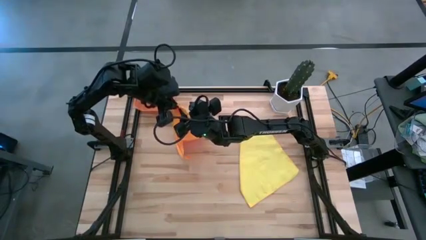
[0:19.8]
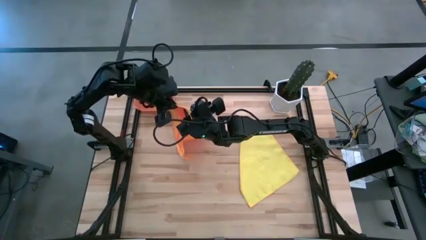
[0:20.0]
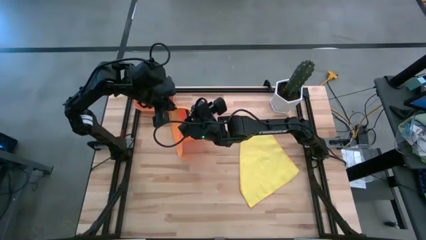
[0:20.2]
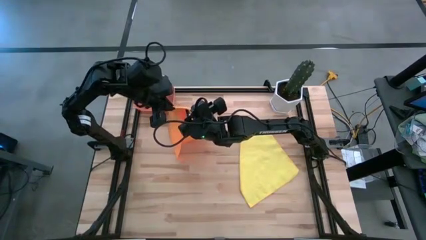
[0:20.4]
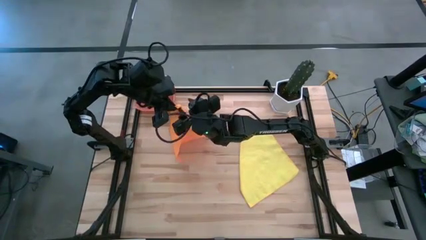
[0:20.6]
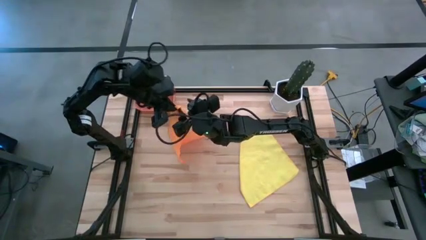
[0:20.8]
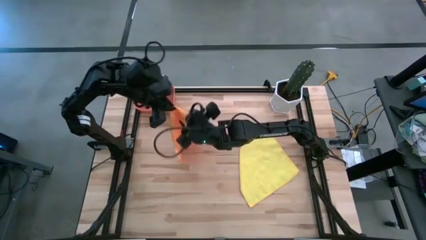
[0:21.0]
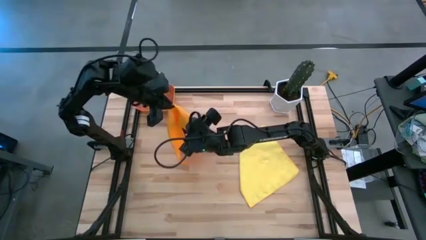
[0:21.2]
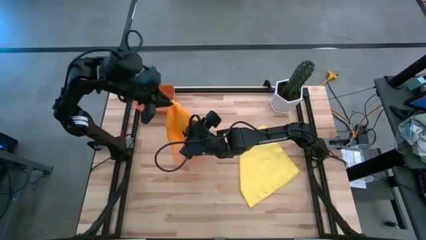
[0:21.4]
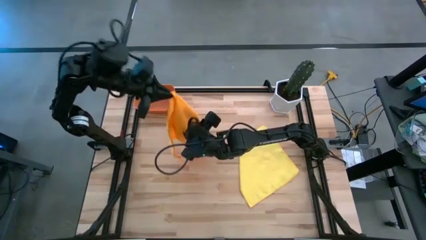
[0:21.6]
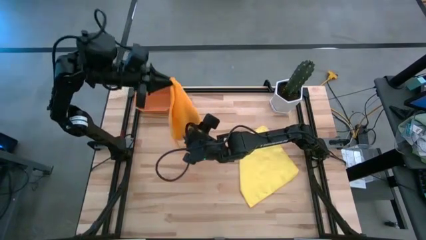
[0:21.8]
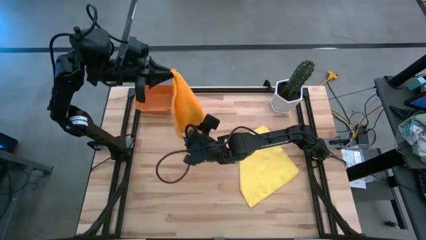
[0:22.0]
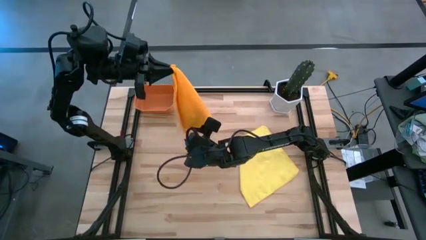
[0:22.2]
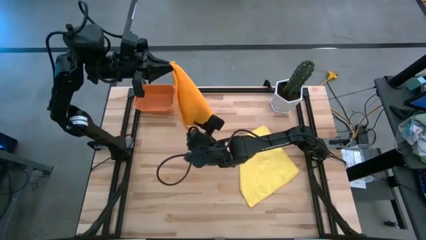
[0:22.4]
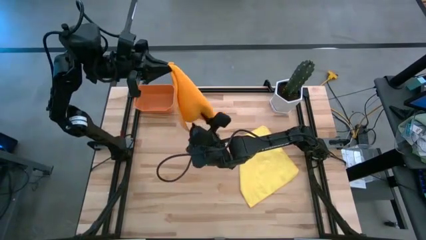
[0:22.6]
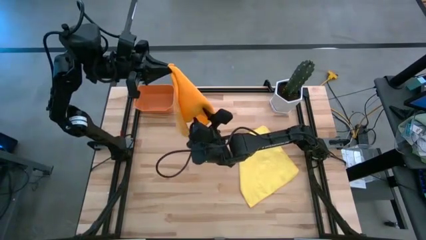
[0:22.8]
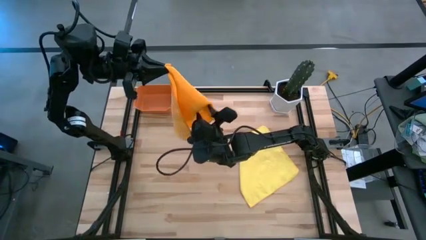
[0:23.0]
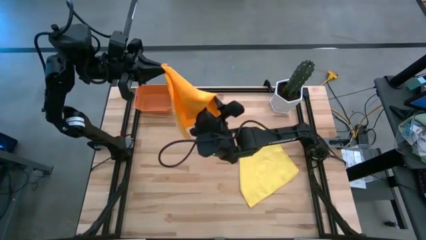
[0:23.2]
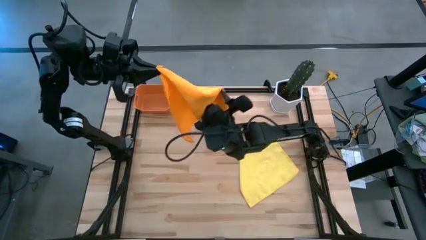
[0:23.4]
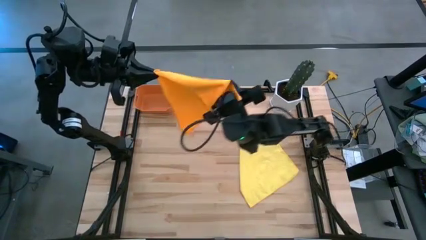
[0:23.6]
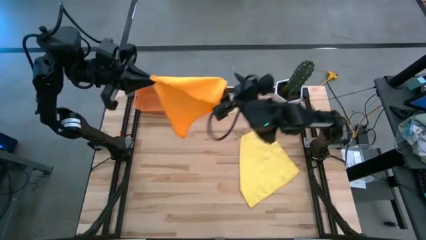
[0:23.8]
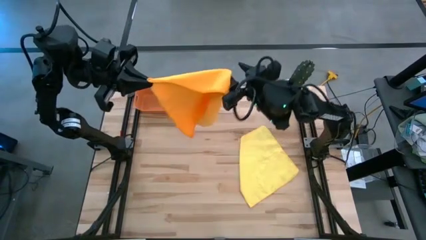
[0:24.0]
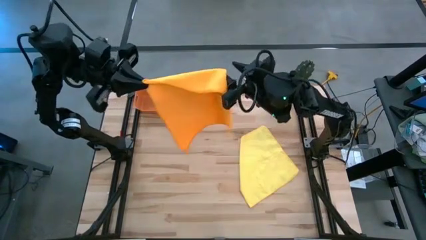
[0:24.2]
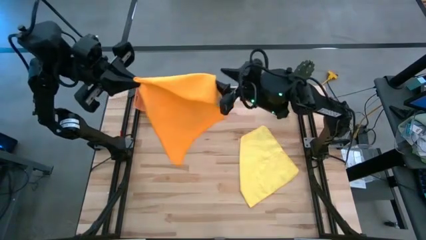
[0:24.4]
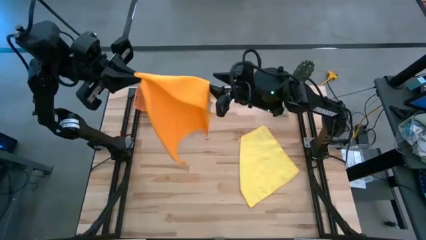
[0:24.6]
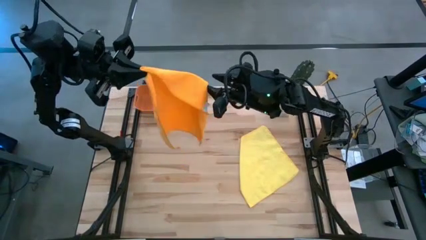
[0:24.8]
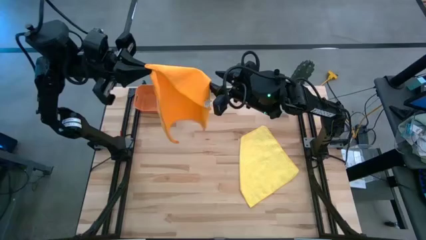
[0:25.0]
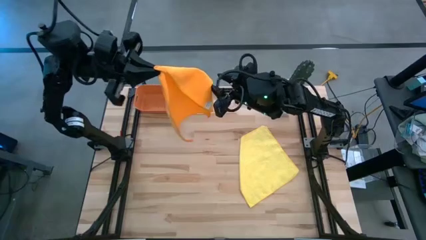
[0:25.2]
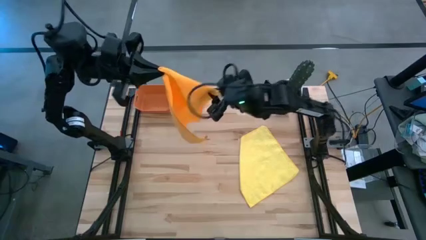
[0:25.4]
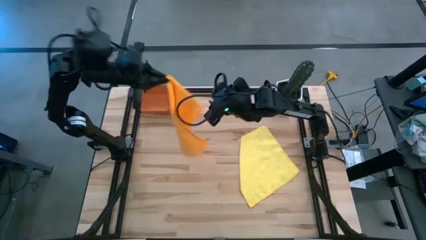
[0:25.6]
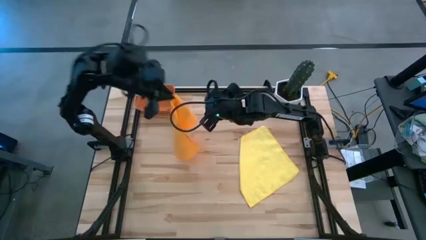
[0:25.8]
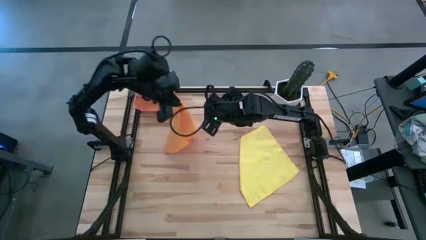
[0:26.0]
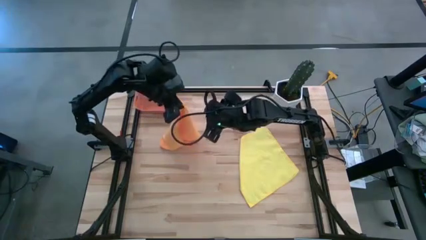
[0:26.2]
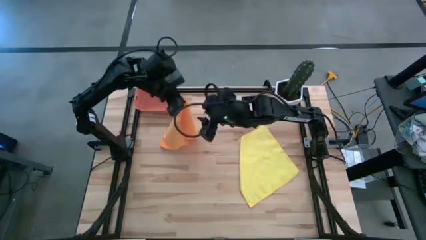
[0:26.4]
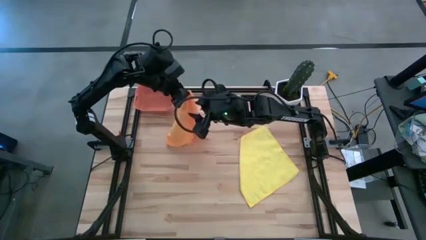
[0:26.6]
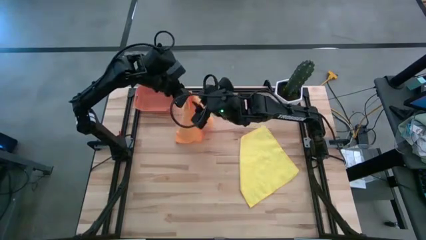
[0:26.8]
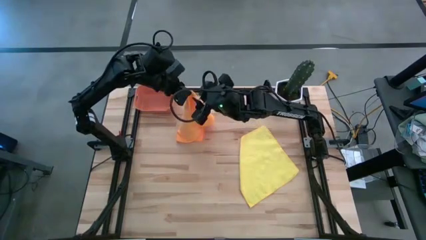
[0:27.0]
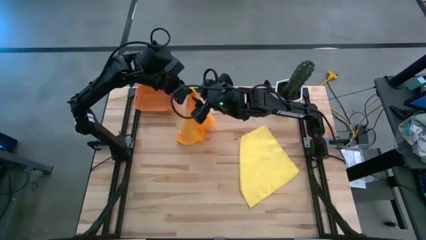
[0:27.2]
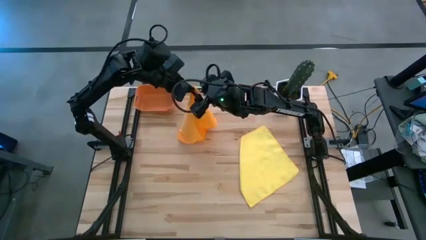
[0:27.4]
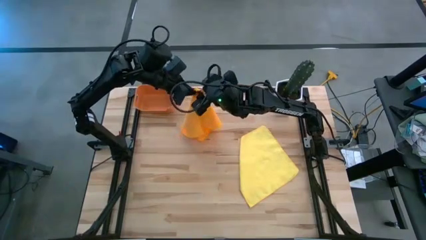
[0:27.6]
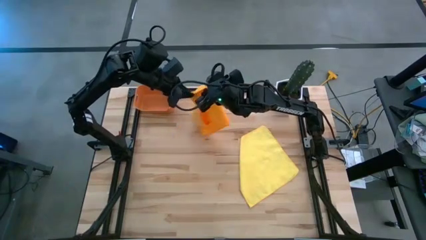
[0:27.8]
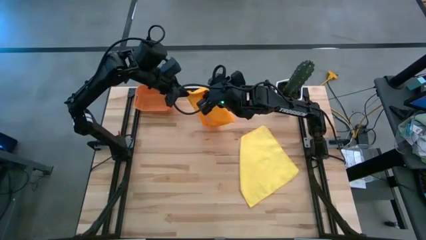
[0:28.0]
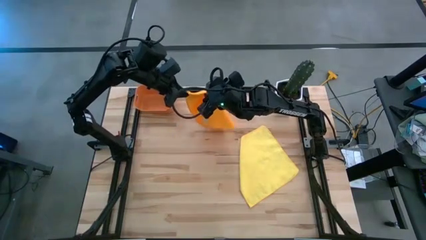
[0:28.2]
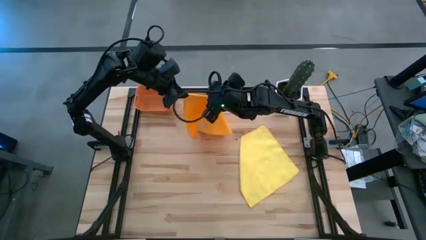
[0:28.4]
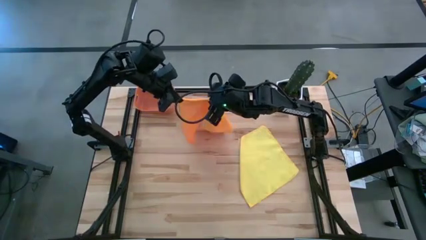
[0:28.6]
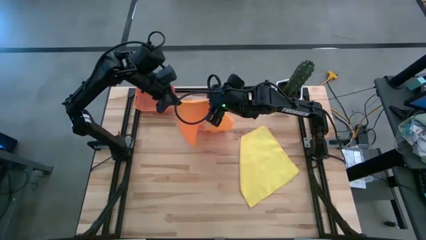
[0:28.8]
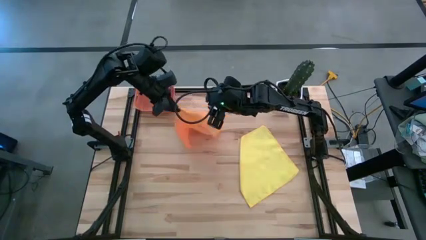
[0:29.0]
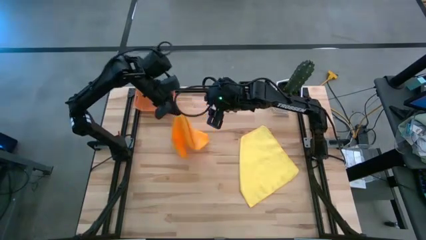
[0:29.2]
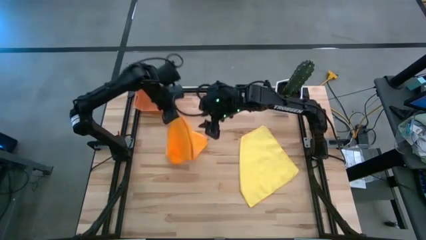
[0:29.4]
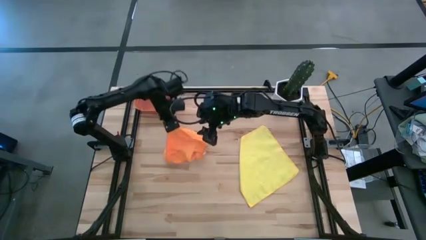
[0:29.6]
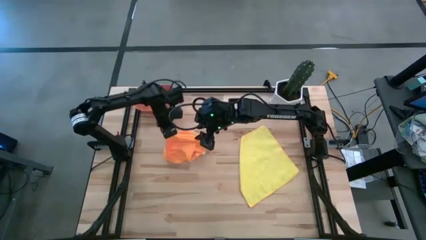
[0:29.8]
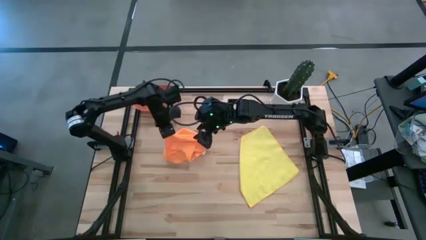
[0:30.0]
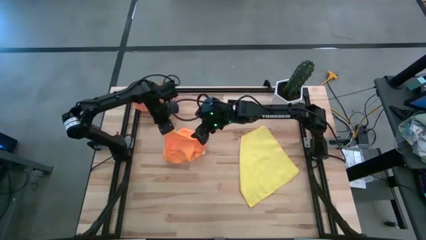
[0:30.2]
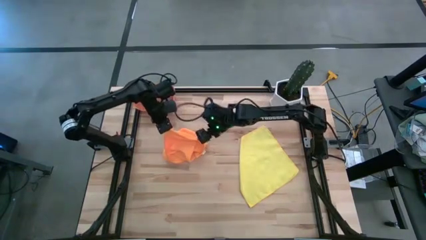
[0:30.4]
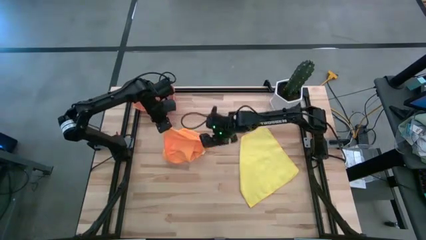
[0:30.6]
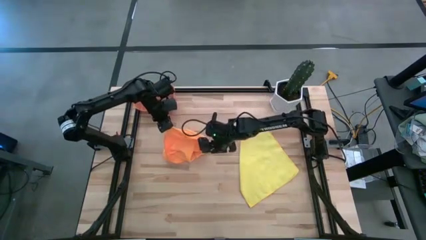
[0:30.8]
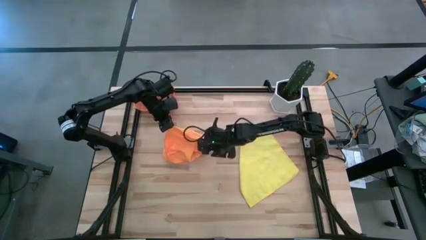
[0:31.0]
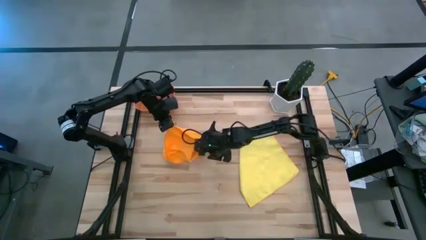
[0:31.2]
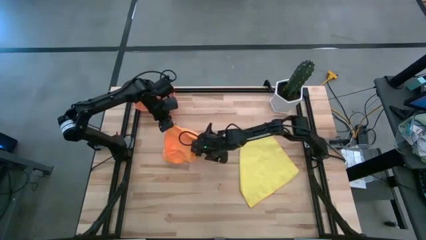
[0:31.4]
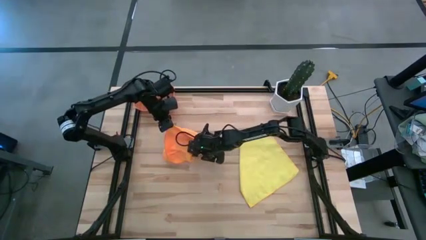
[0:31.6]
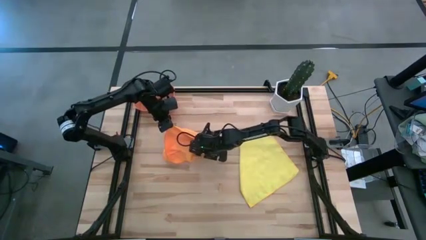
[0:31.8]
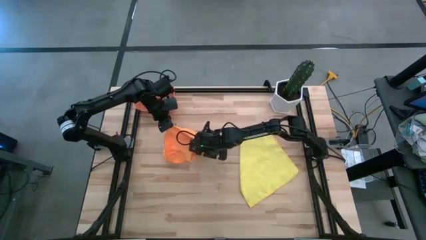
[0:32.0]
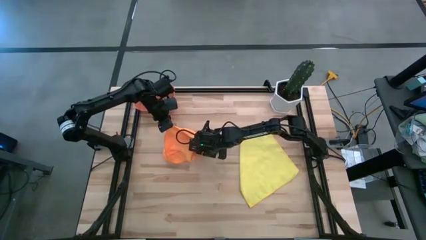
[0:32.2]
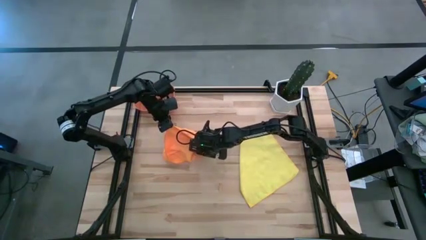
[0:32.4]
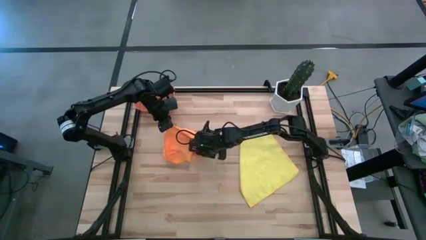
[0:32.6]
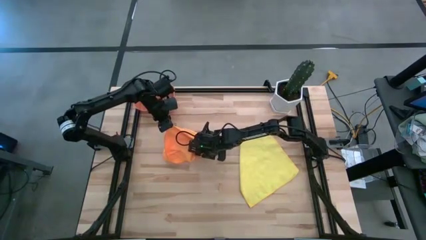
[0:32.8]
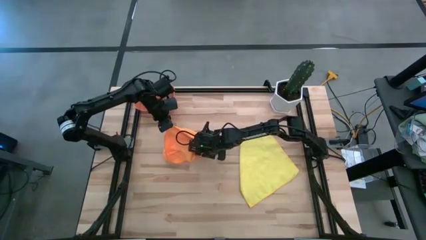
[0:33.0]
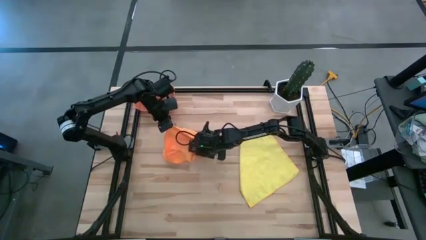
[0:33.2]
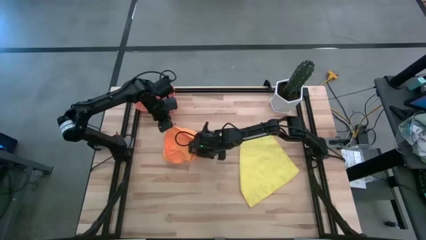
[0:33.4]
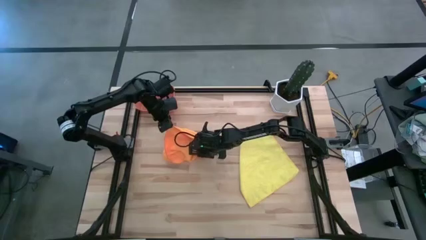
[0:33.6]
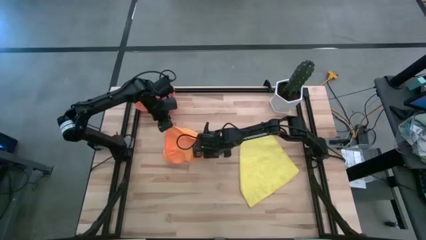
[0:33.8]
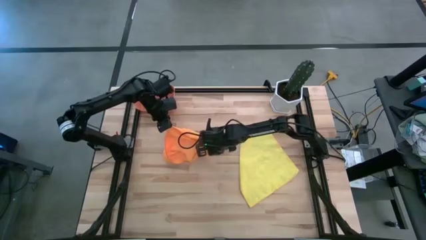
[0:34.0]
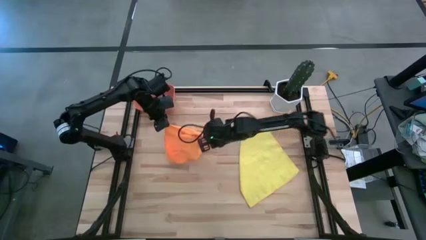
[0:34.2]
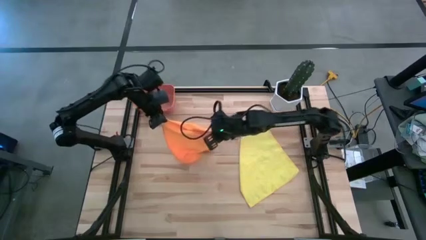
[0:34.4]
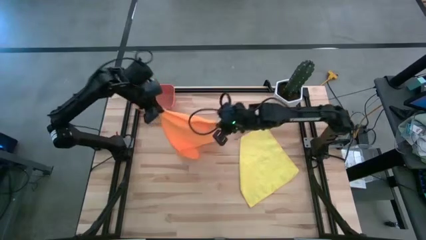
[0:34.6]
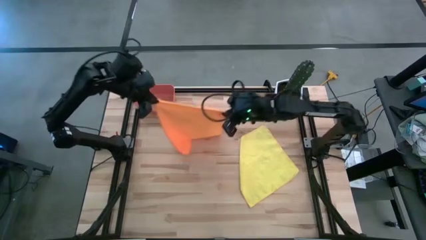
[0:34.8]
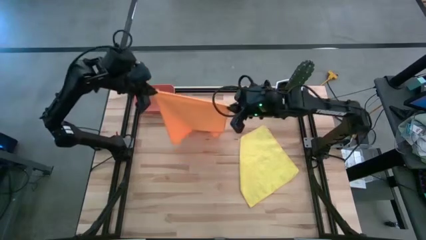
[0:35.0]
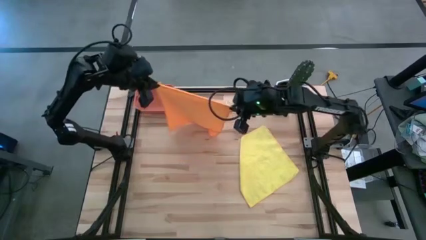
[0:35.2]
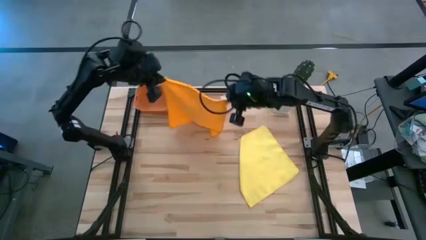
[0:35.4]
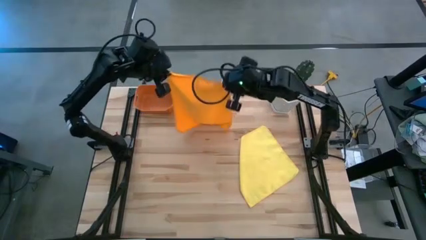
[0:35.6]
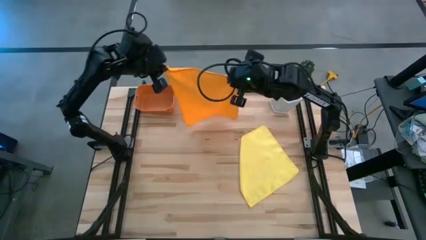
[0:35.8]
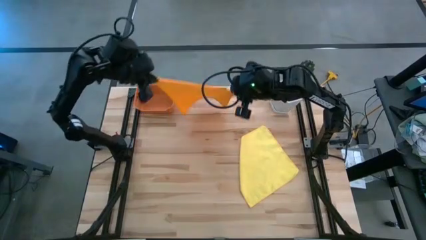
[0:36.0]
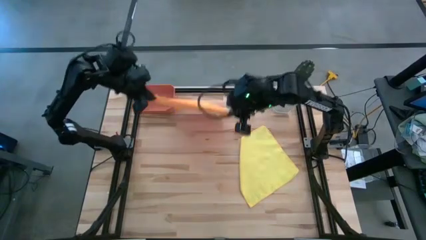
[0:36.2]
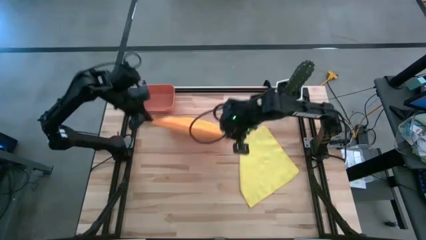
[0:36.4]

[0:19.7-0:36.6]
Task: Roll microfiber towels into tight, uniform cylinder then place into a basket
Fold the orange towel
